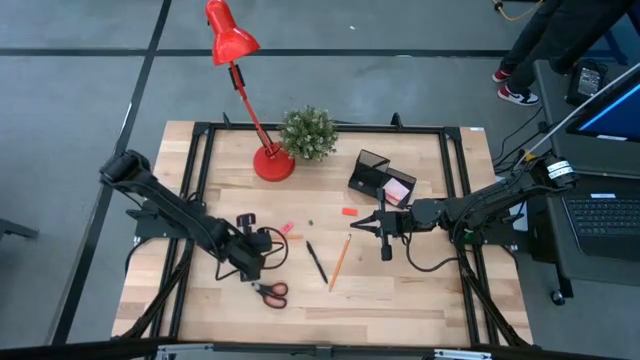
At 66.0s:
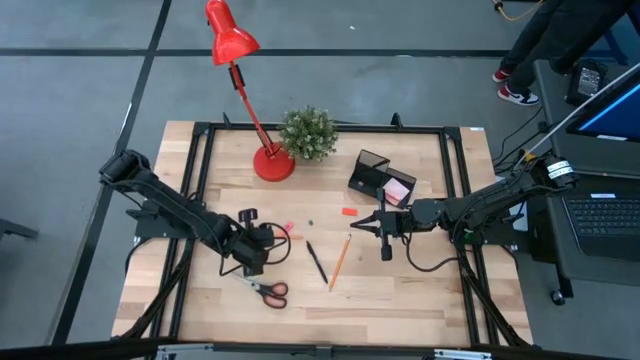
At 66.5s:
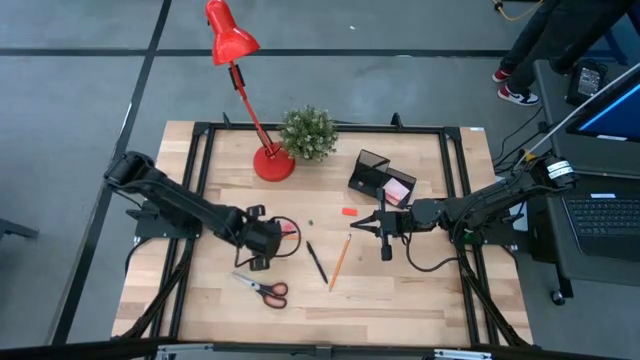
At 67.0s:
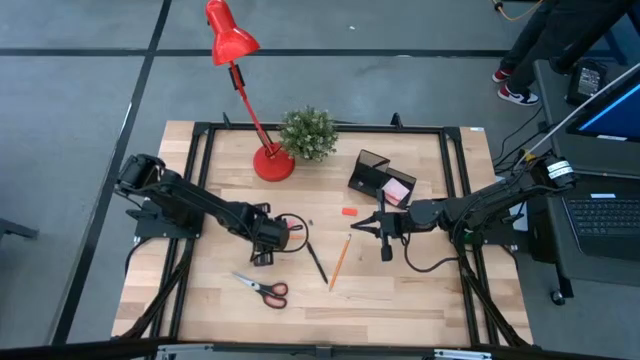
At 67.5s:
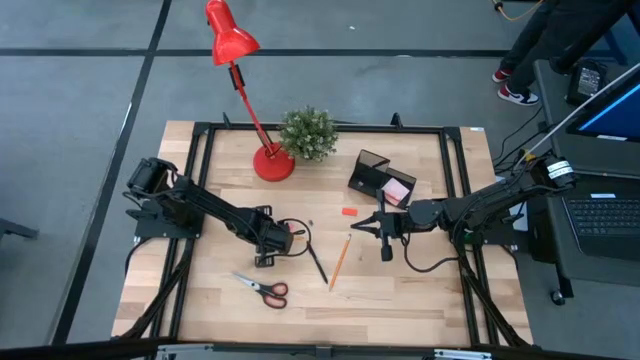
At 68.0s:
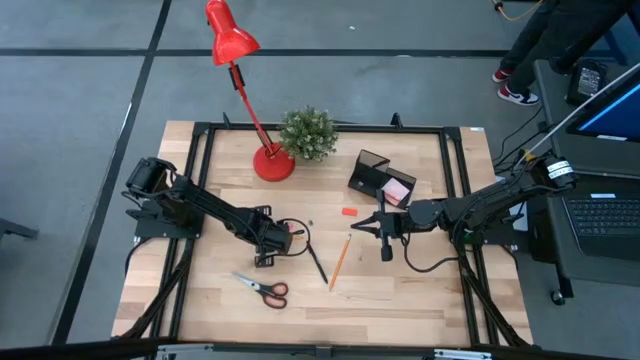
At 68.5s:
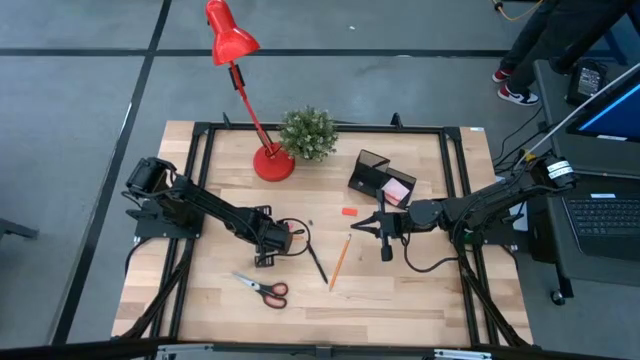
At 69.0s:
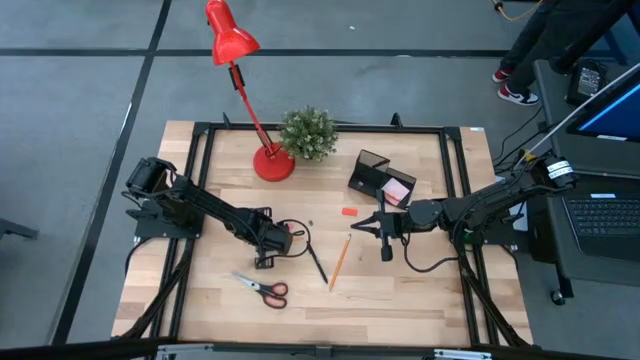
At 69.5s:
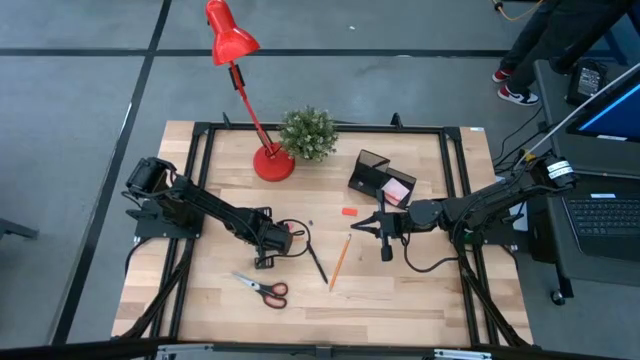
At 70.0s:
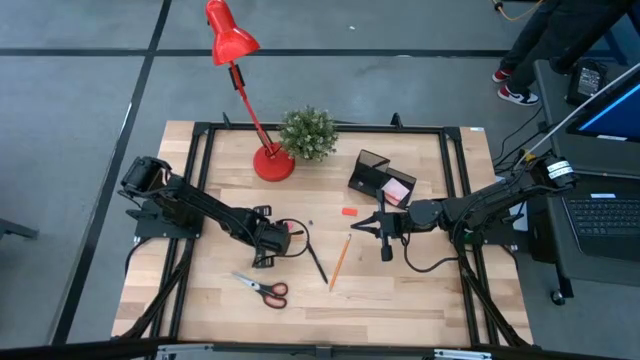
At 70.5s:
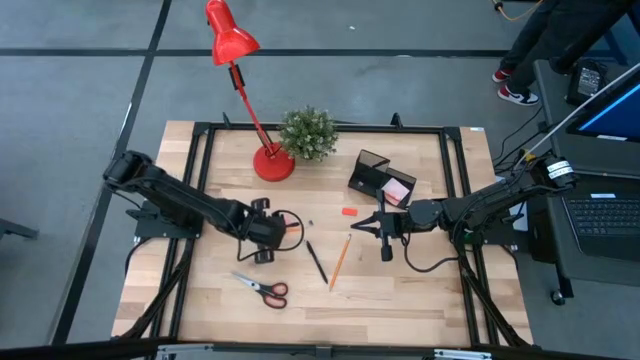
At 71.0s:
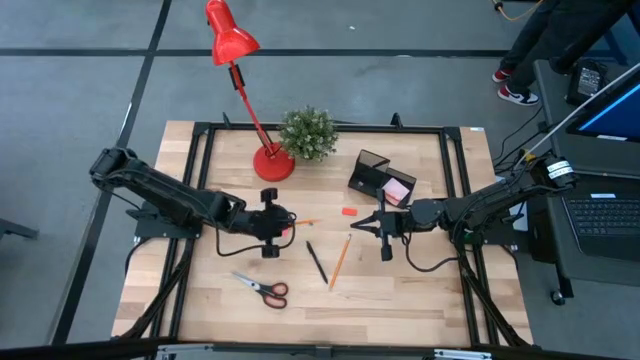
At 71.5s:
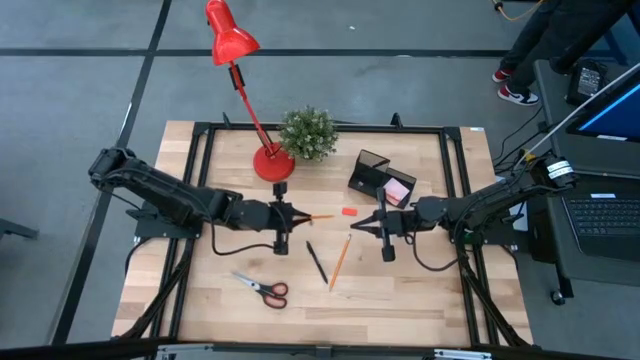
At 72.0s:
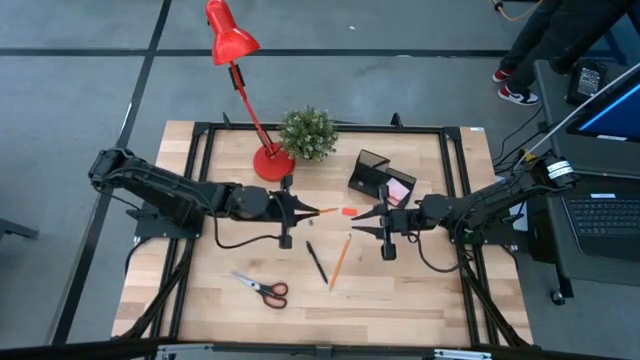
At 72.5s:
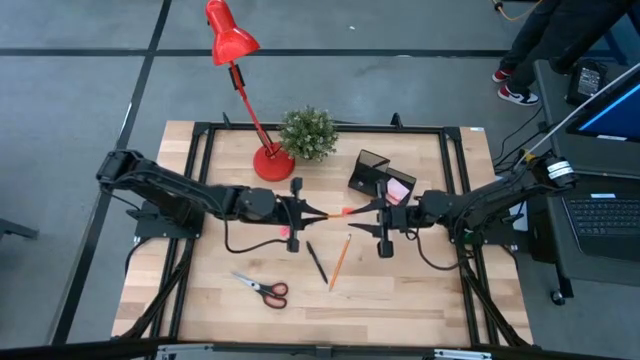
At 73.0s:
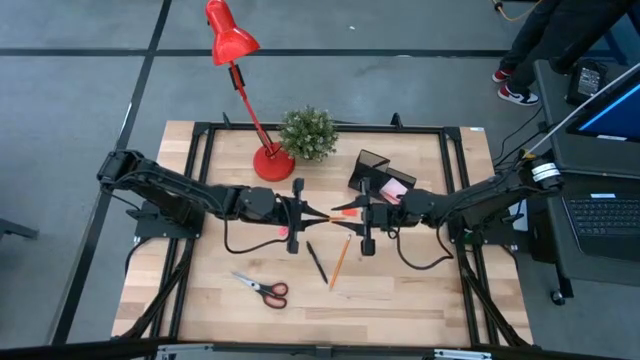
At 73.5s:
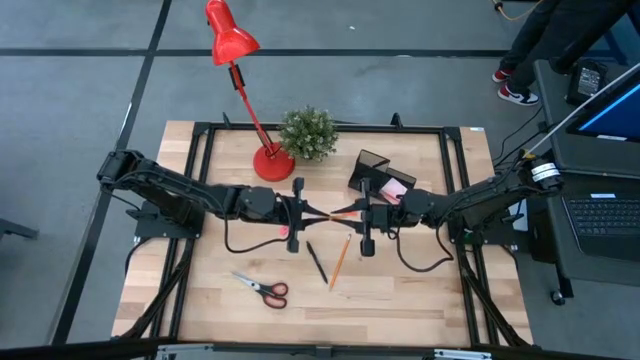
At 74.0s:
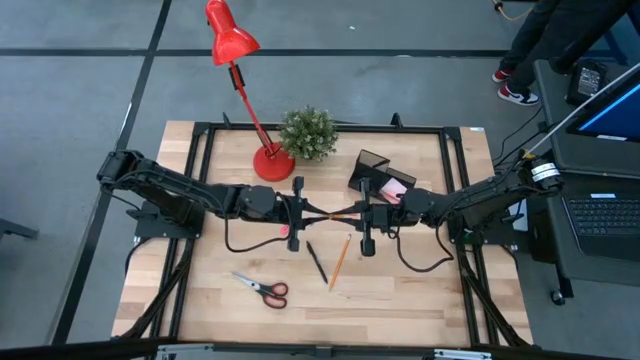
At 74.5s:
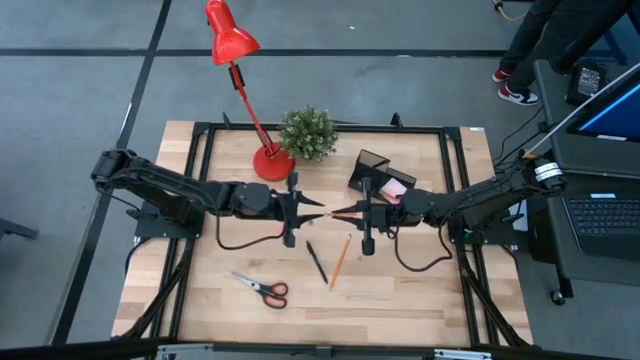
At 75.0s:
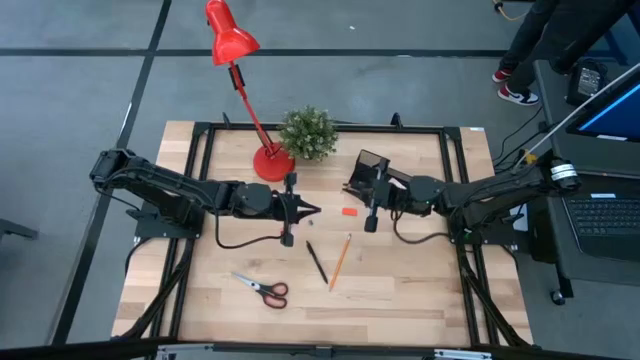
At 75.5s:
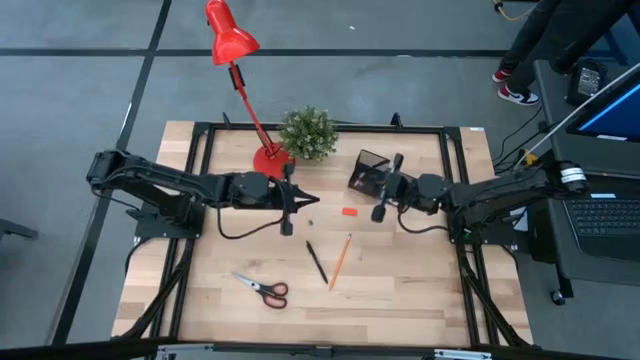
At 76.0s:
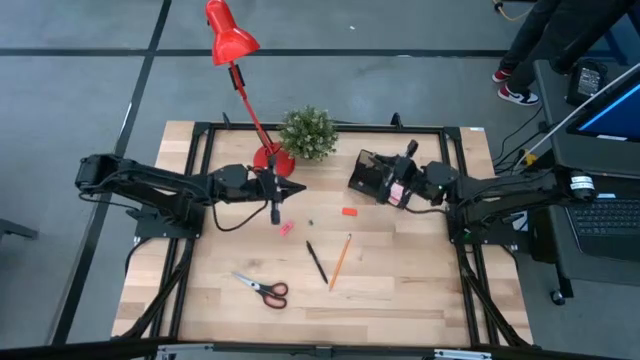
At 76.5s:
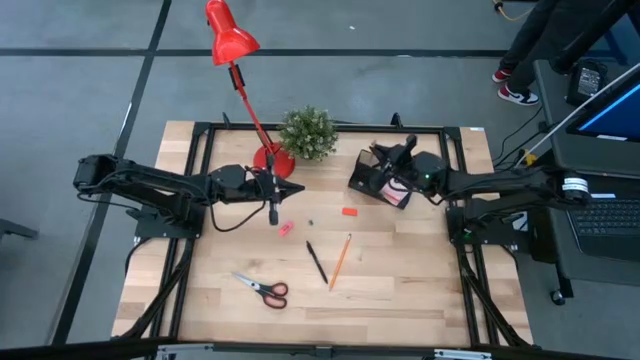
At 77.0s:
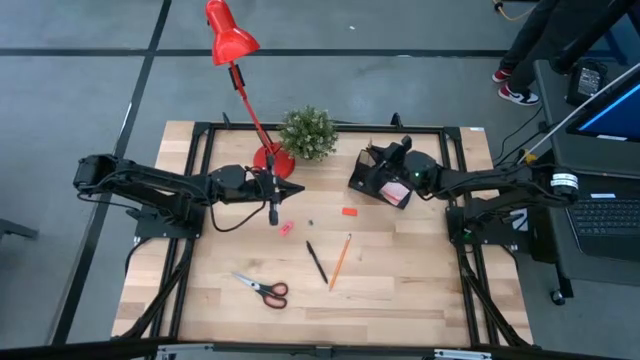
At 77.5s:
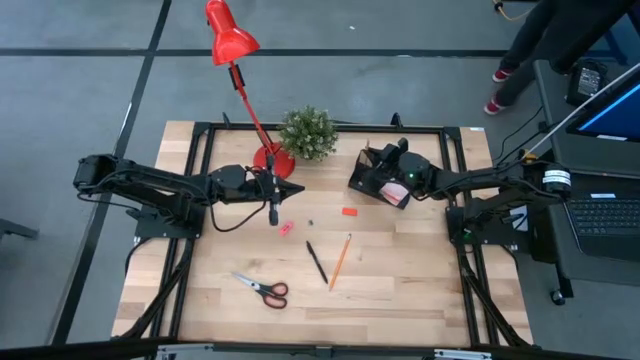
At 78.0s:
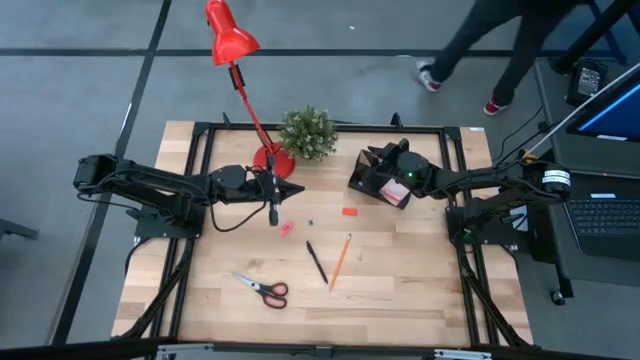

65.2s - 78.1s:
Task: Pick and place office supplies into organizer
Put the left orange pencil into the black desk organizer

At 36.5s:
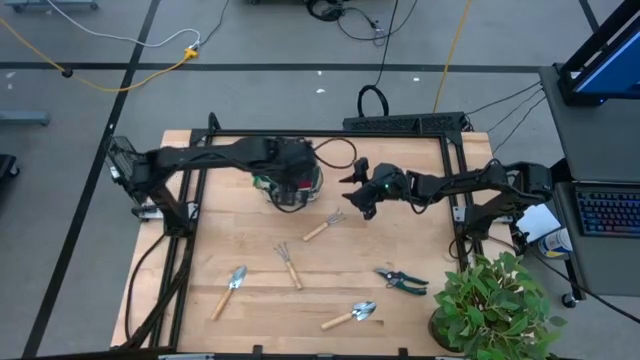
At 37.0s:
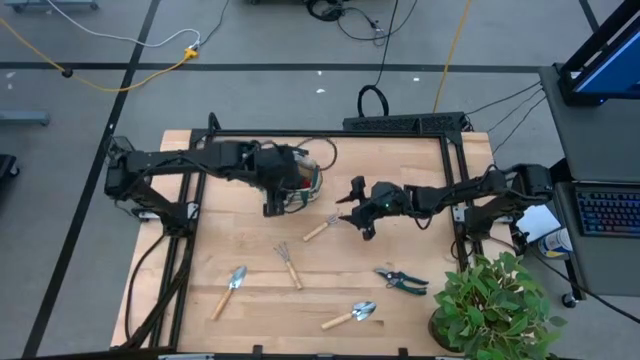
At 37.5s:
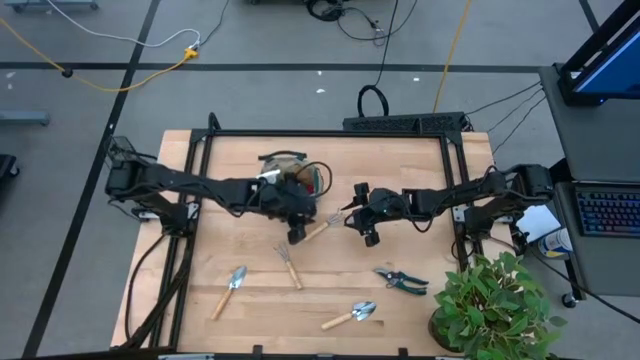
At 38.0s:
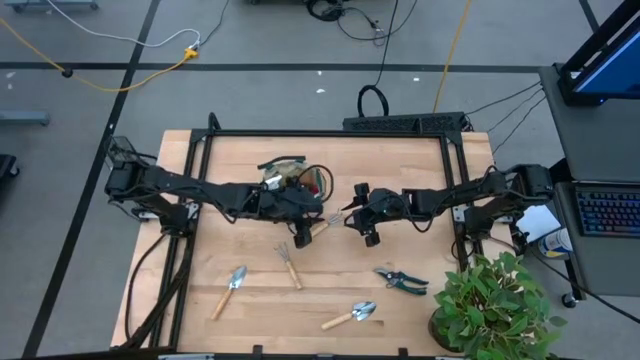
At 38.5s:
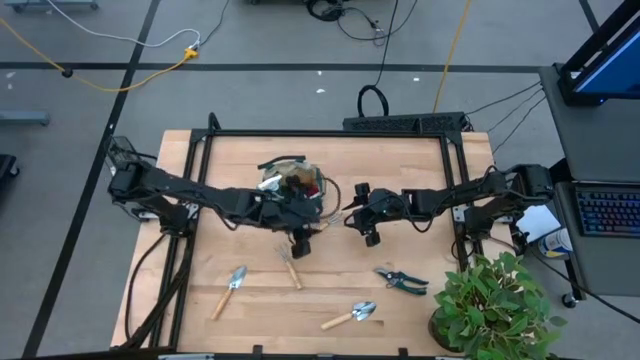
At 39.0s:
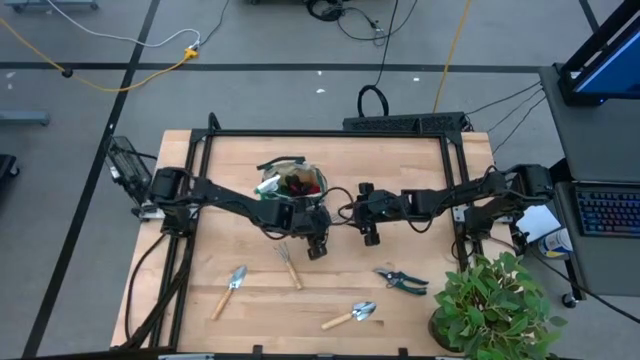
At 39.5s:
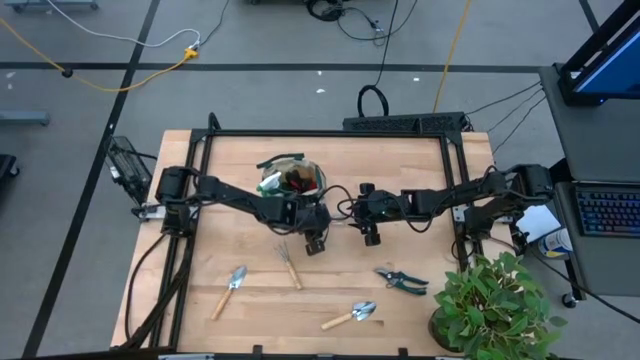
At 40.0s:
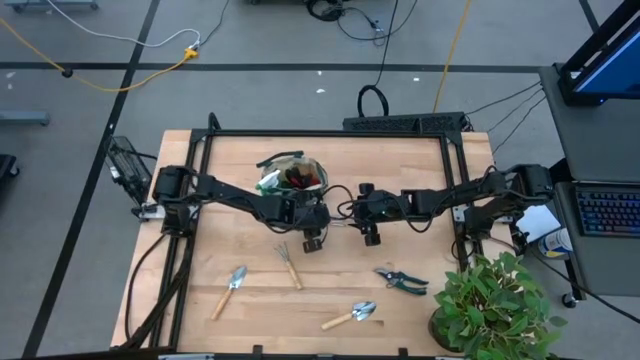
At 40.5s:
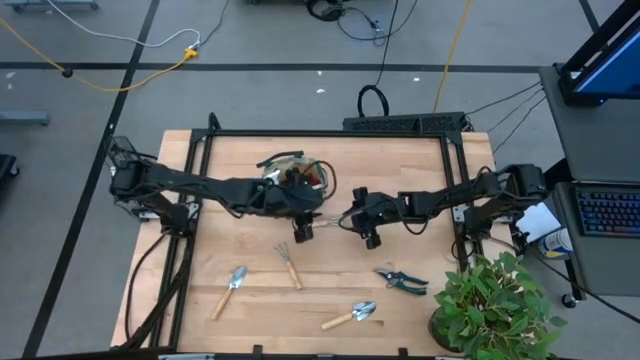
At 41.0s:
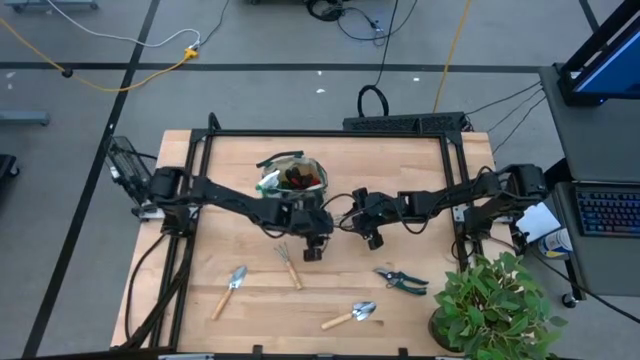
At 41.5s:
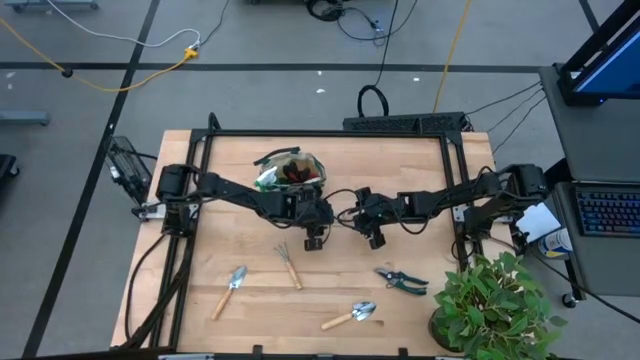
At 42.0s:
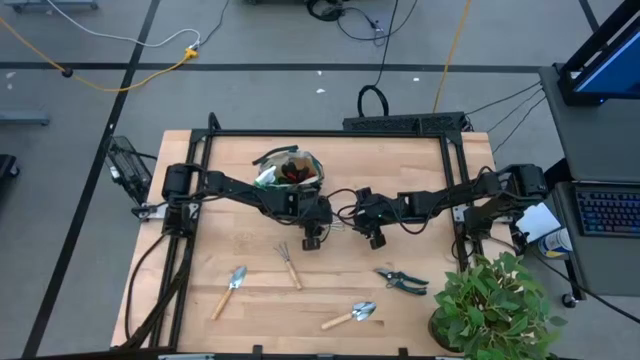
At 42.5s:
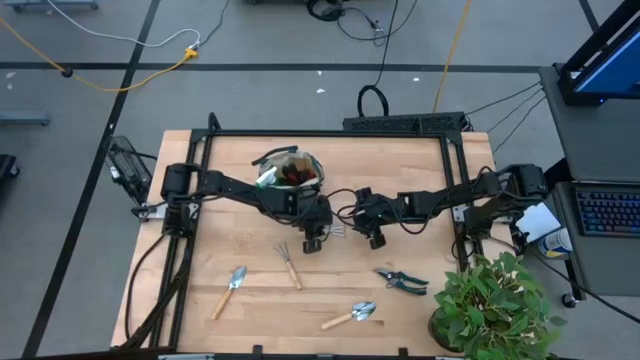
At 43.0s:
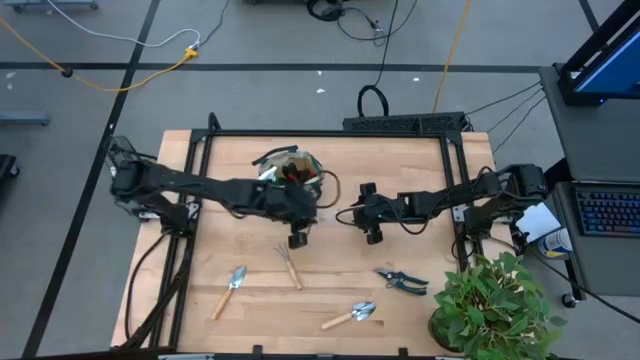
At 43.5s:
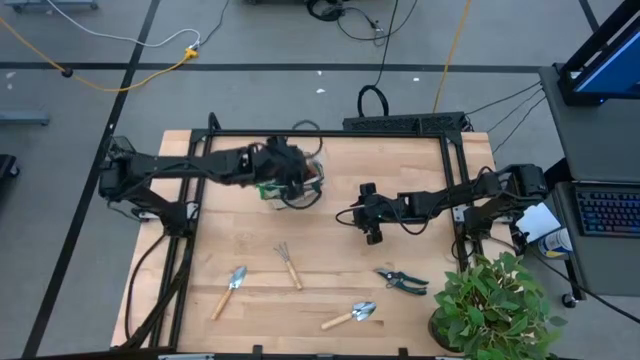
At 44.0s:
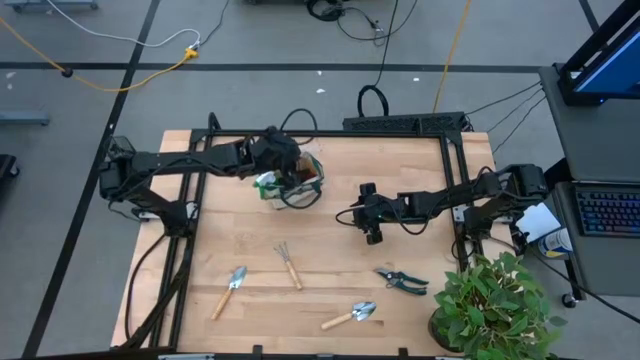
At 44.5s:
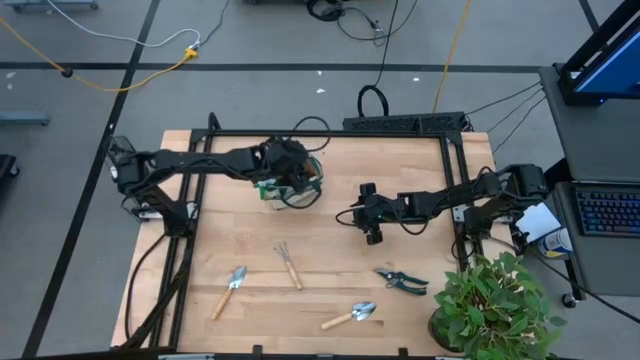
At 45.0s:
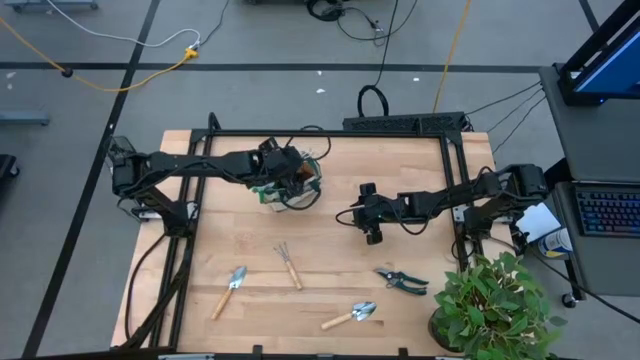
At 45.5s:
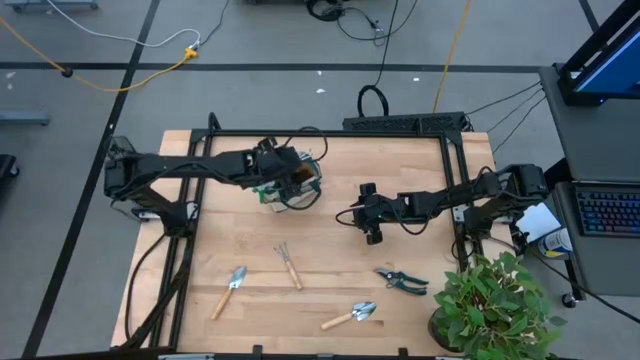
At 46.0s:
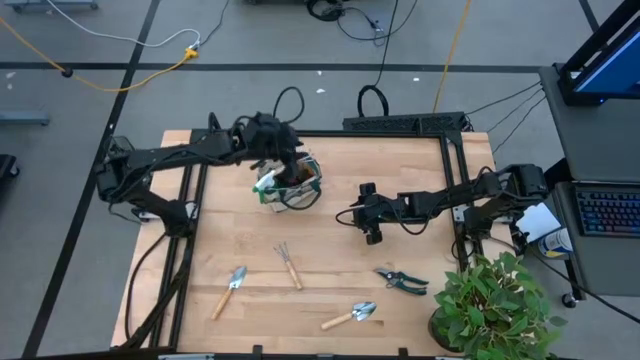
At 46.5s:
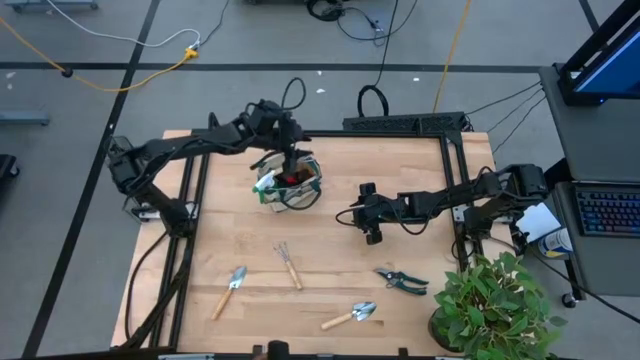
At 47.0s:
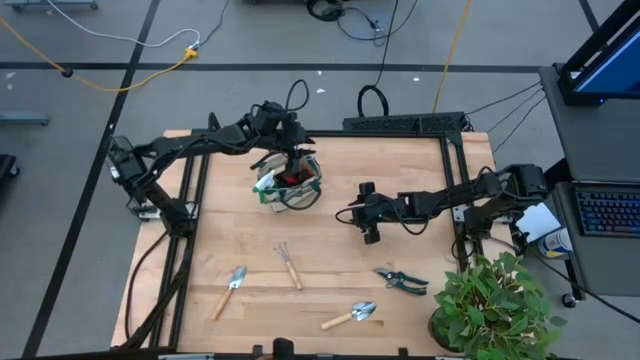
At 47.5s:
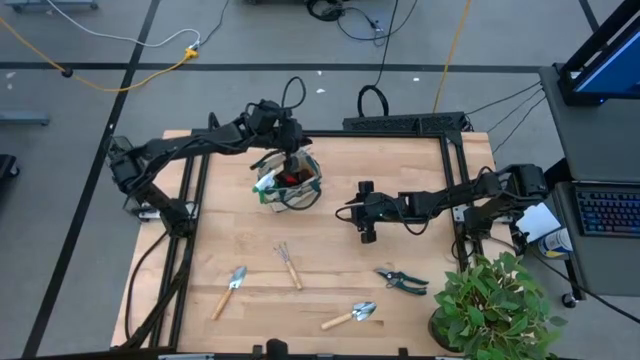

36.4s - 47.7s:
Task: Pick & Place Garden tools in Gardening bag
Put the top hand rake into the gardening bag
